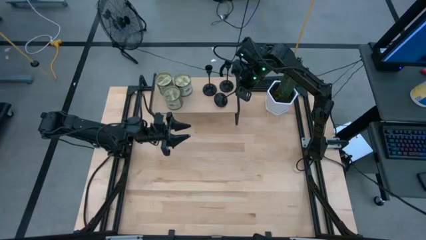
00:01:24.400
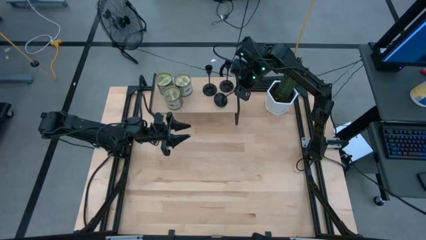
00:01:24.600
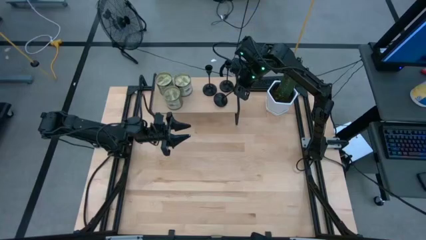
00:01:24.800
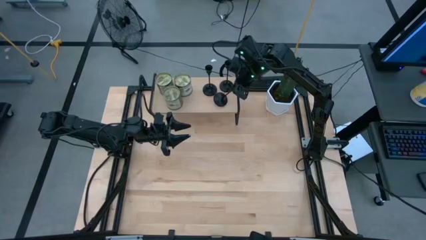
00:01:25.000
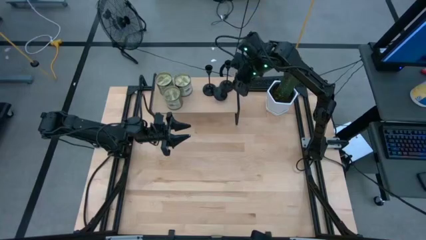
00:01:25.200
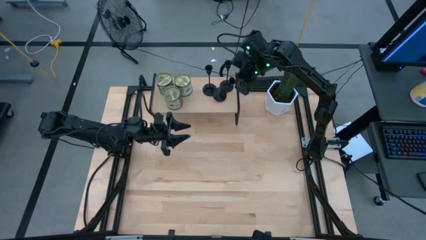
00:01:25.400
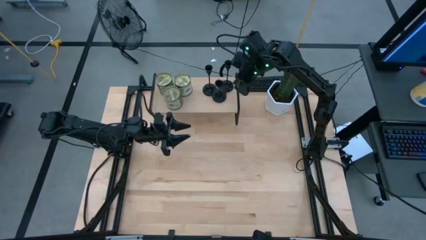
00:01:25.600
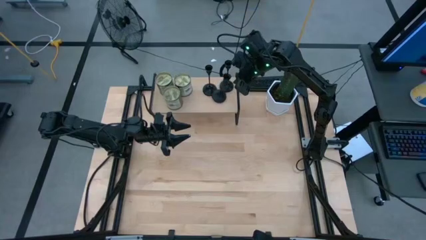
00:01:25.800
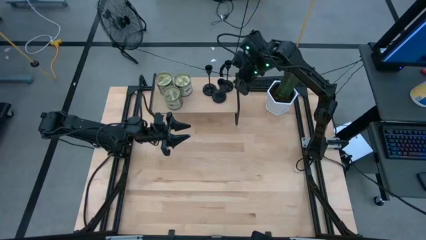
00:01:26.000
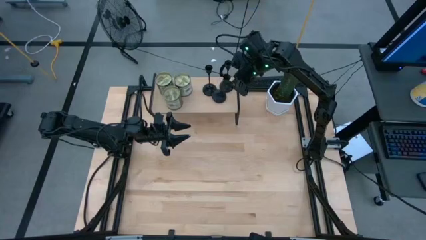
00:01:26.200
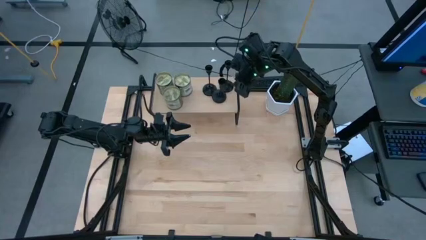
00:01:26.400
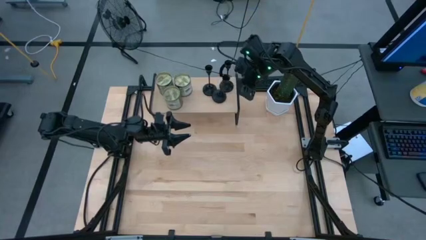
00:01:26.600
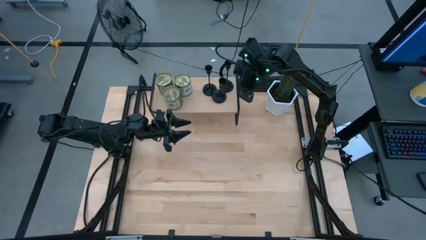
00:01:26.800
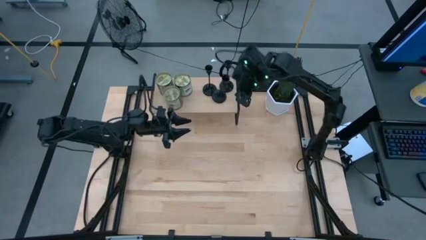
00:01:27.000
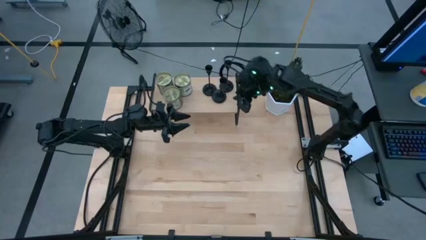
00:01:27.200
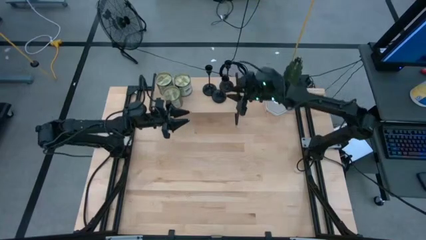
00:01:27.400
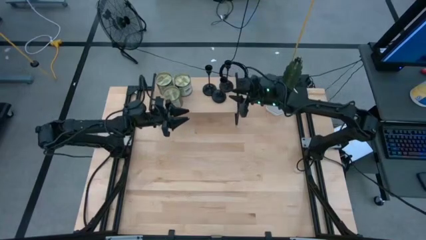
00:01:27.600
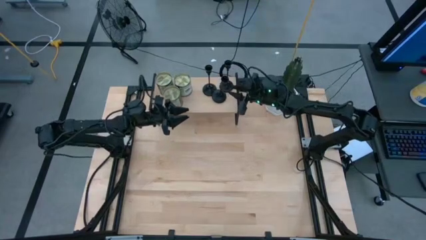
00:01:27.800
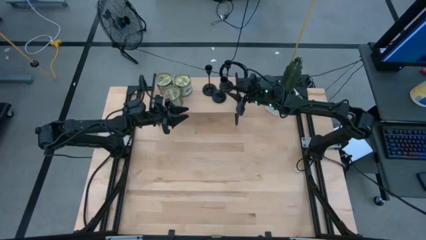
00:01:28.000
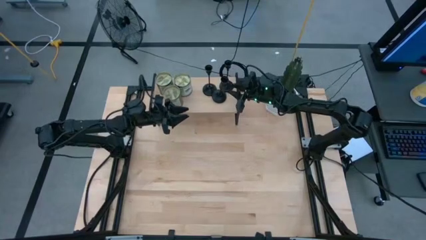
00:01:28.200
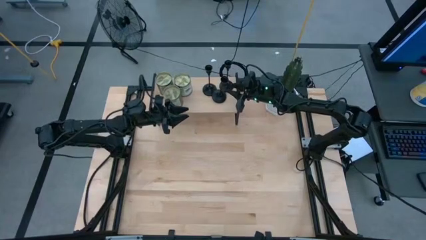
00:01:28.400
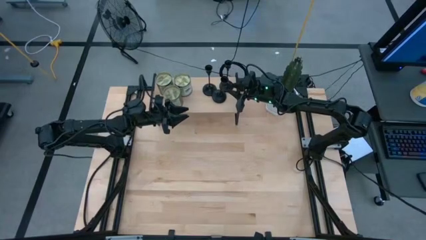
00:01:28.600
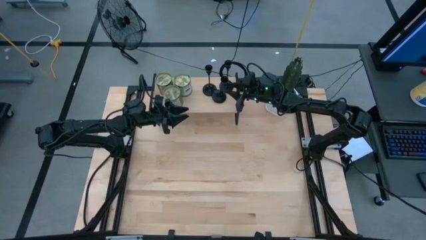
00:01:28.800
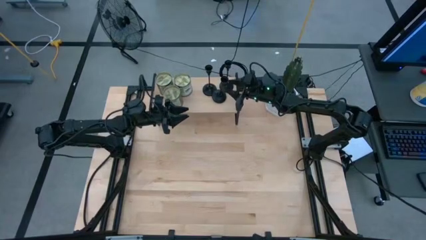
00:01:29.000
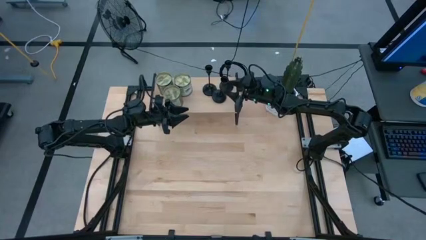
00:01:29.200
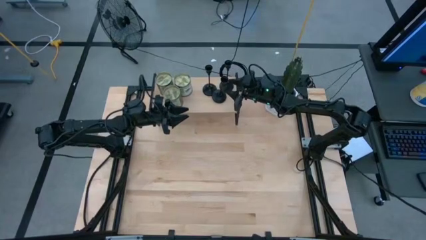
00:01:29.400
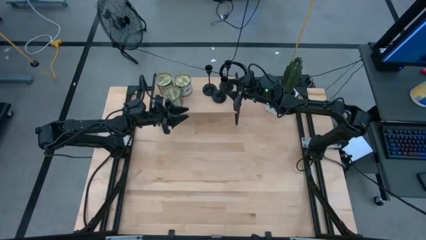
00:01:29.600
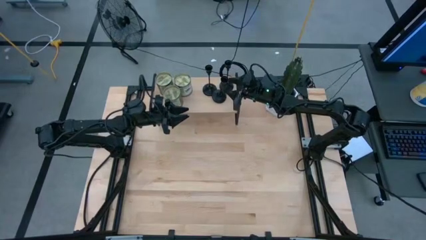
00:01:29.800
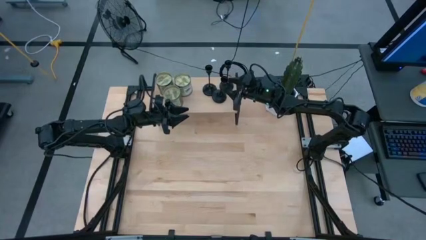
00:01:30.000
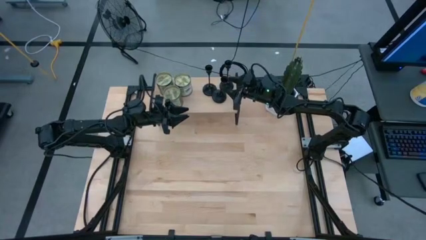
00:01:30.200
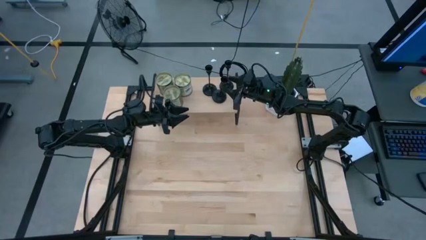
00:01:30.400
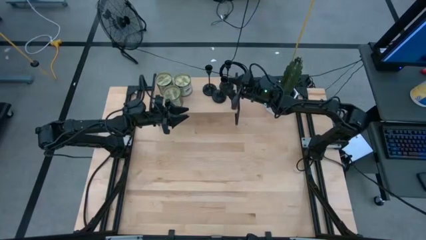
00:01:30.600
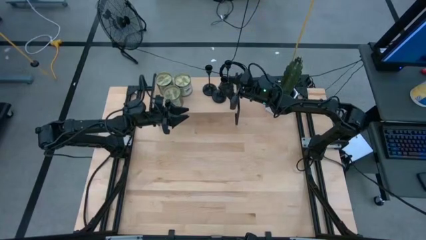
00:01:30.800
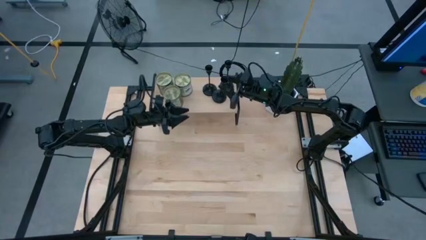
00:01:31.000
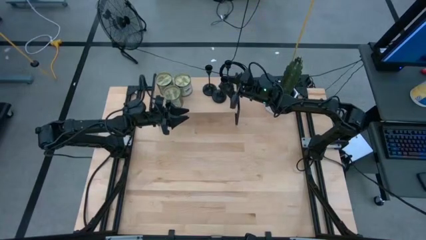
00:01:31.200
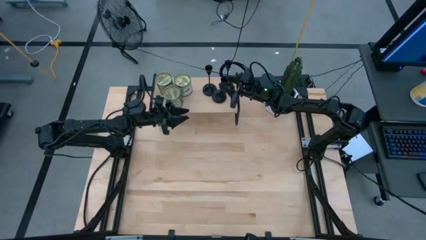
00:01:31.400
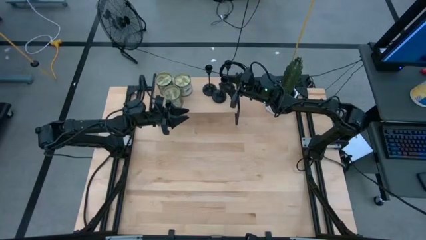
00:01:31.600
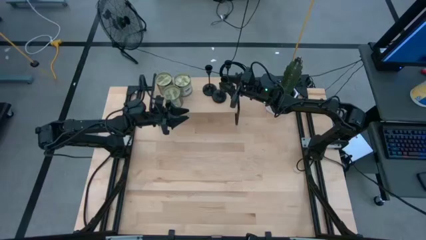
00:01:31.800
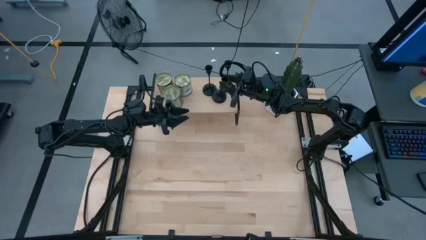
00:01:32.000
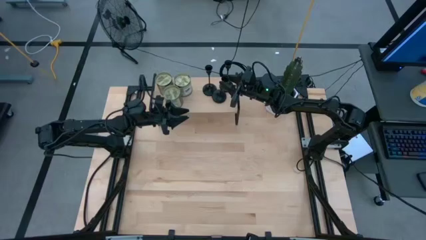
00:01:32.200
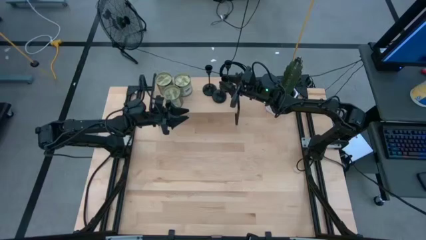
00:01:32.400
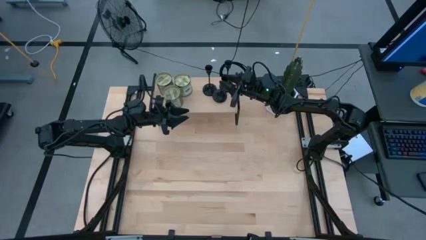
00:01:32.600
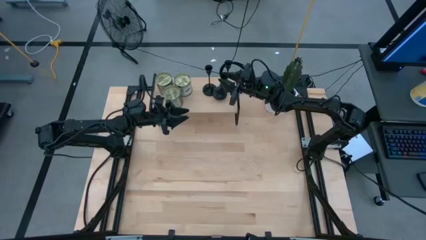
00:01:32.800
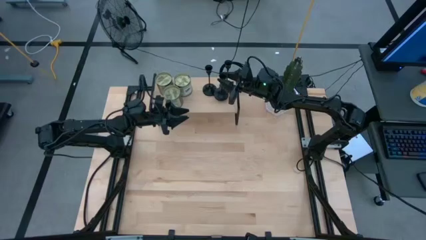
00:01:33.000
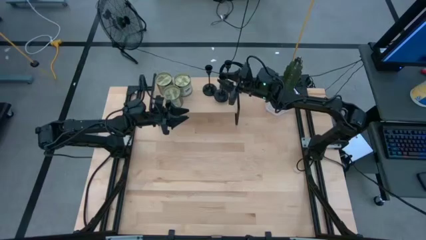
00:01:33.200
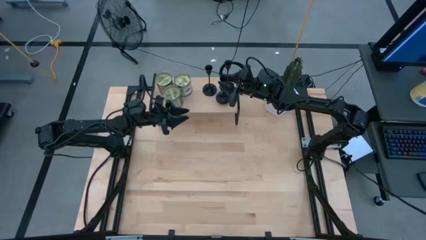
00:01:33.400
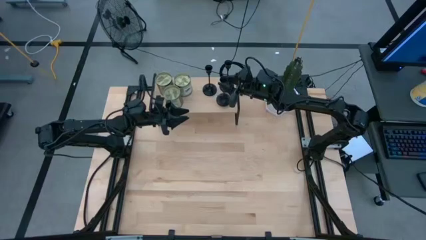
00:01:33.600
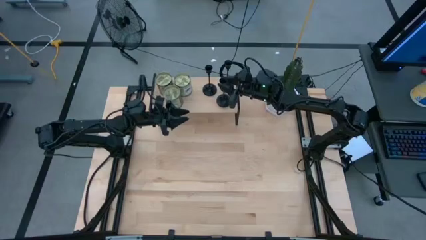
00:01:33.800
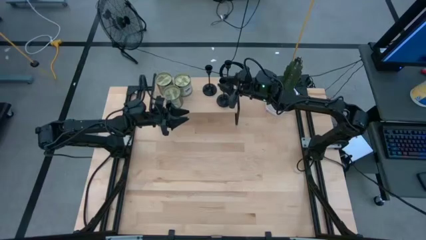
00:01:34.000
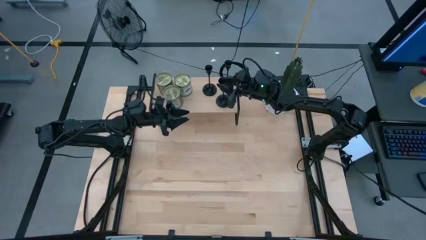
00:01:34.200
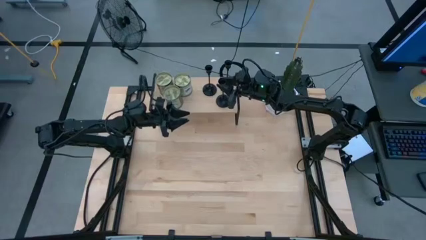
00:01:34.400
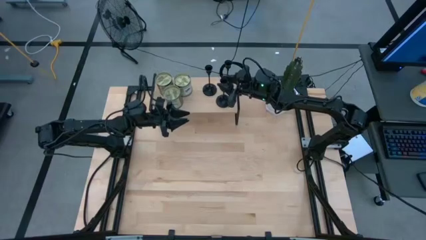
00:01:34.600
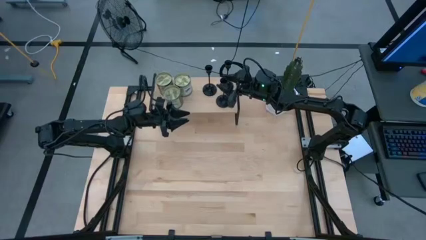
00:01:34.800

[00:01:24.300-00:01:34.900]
Task: Pick & Place candle stick holders
Put the black candle holder on the shelf

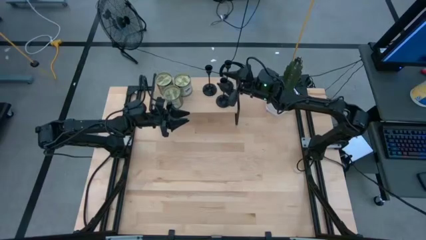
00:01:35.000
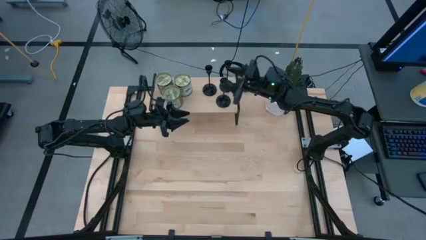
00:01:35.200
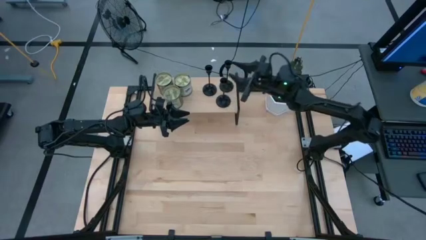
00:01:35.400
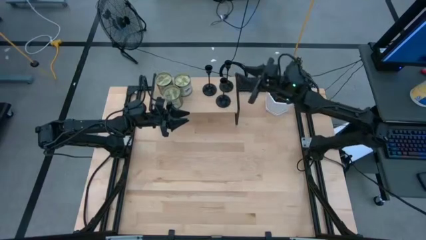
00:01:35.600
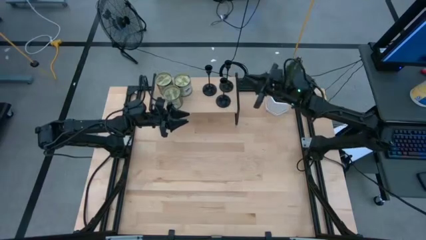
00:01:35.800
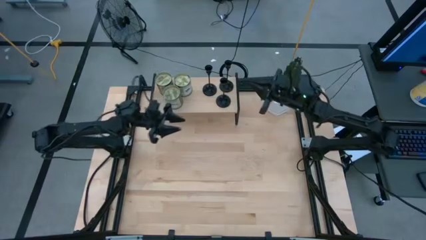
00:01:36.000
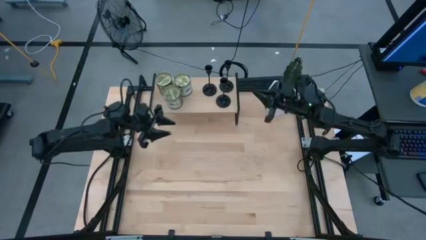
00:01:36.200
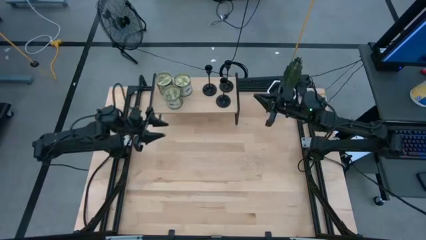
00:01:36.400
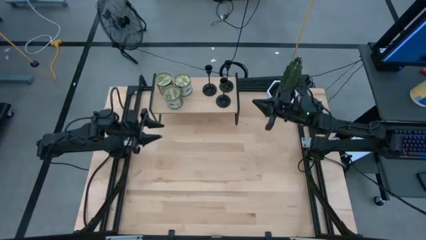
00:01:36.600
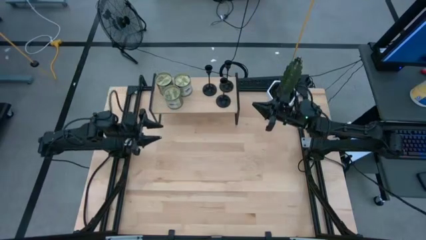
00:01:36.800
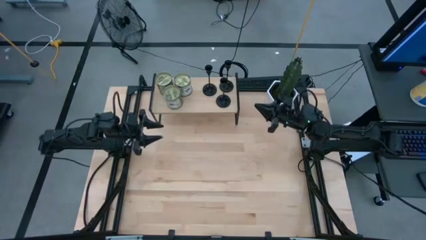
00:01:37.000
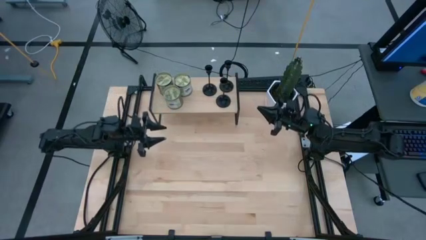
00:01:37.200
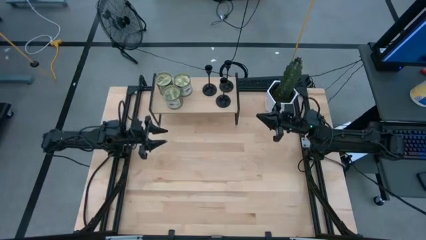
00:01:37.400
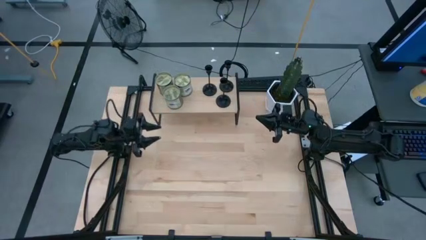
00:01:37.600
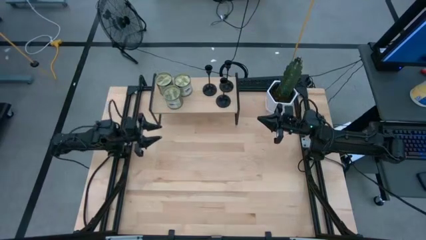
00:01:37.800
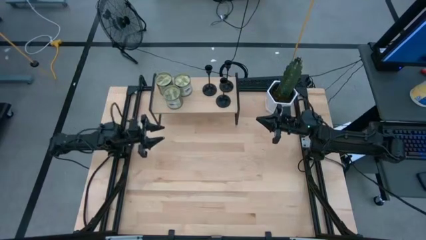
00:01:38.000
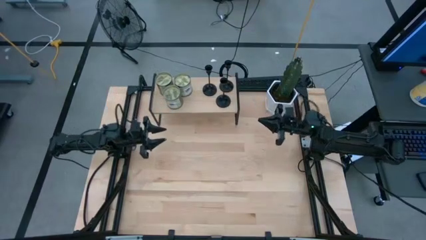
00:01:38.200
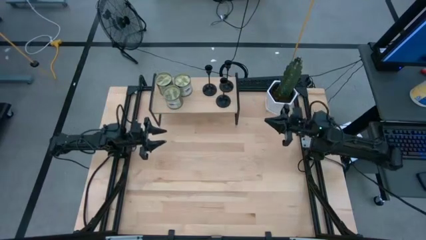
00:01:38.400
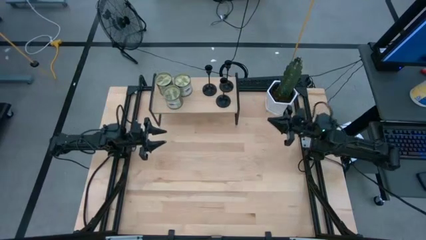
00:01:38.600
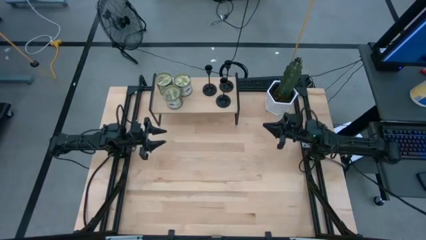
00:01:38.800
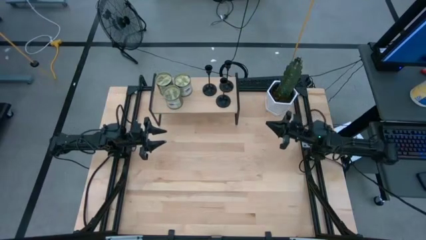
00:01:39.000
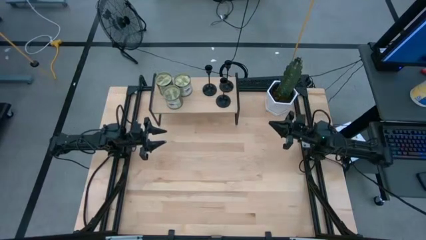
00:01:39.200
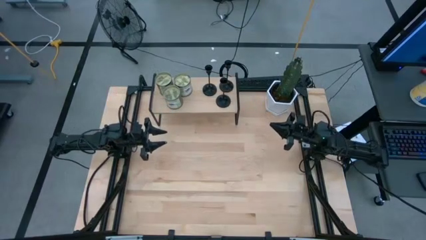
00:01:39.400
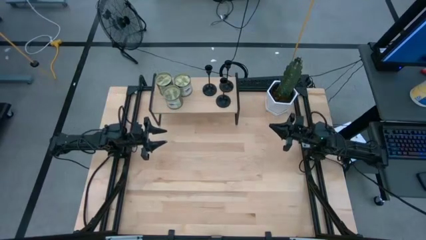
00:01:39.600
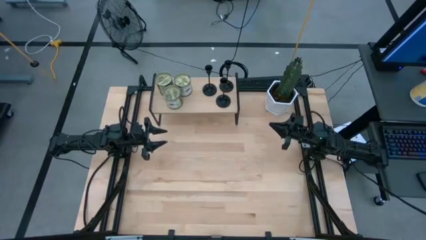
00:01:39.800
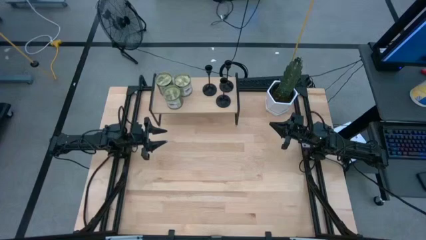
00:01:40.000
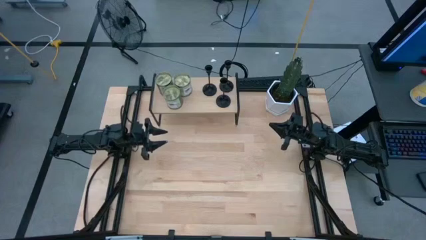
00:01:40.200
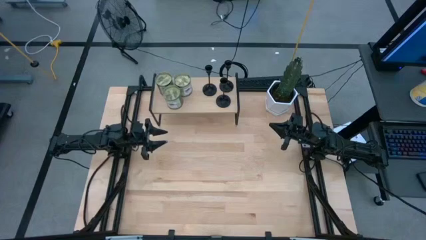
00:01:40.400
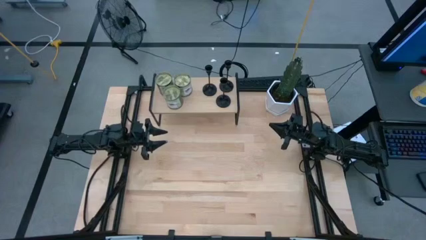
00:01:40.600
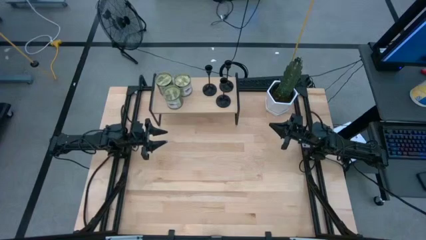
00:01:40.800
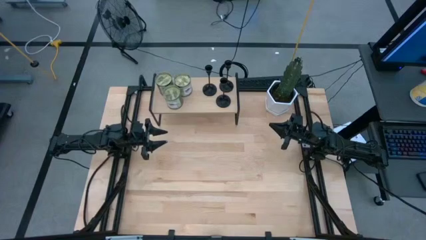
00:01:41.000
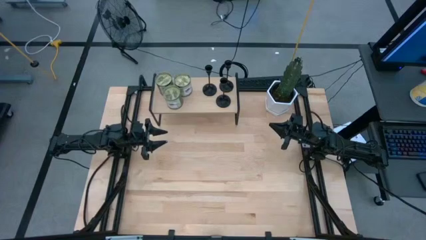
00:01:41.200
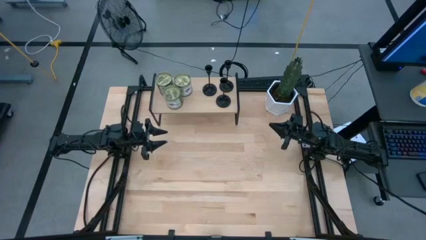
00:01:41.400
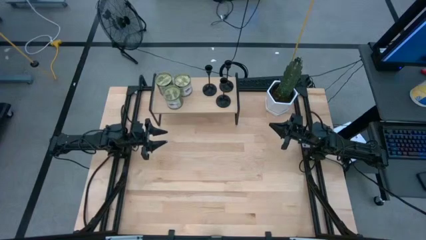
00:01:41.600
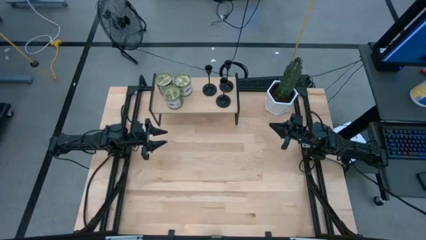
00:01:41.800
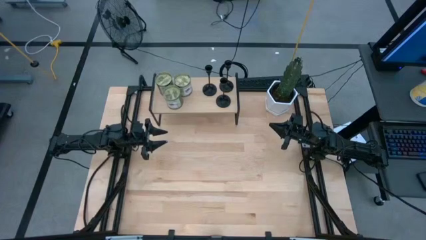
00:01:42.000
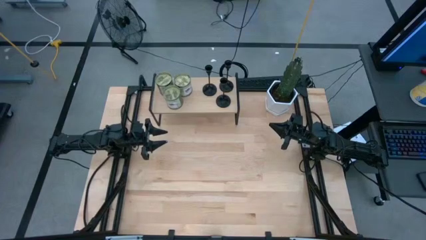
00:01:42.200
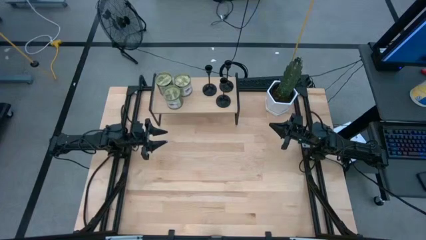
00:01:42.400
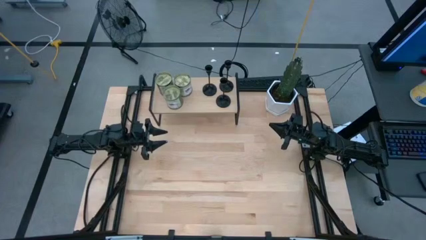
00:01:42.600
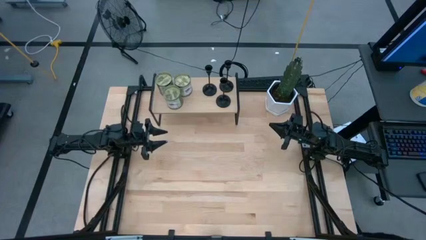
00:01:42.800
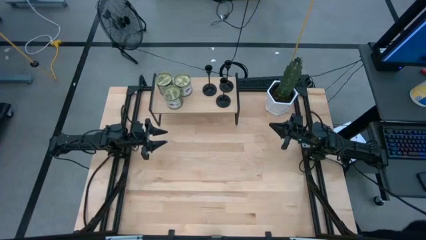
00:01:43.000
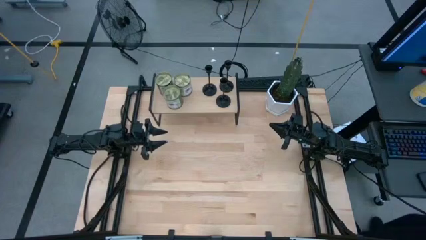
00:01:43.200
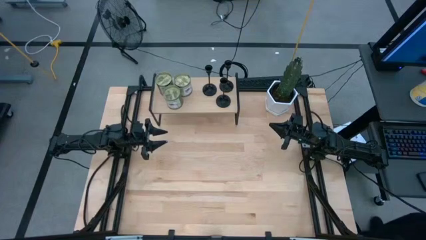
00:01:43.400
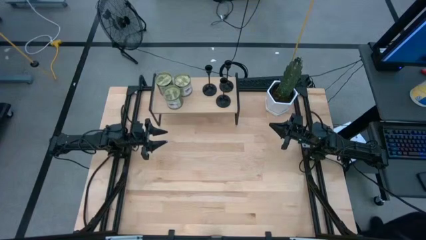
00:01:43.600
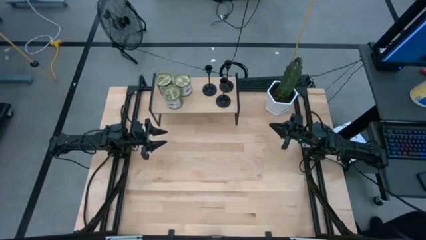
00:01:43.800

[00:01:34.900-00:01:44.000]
Return to Home Position
